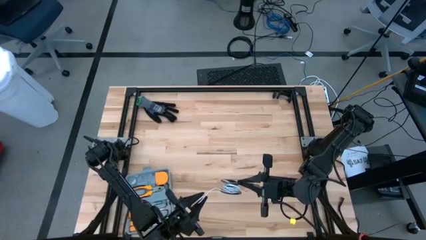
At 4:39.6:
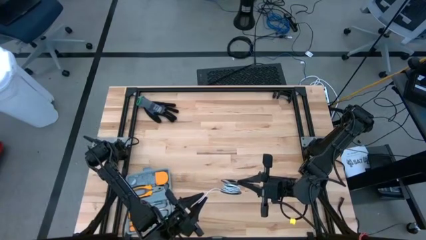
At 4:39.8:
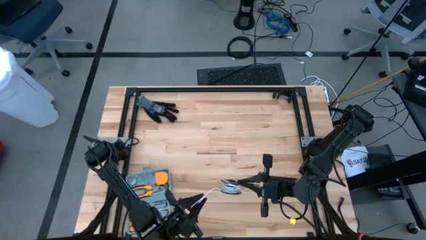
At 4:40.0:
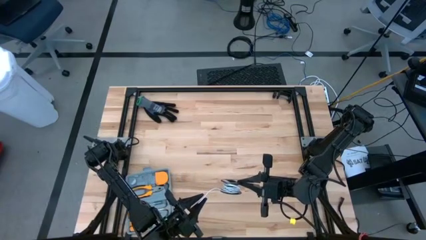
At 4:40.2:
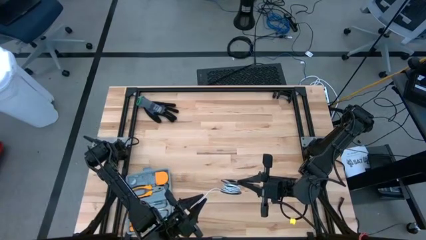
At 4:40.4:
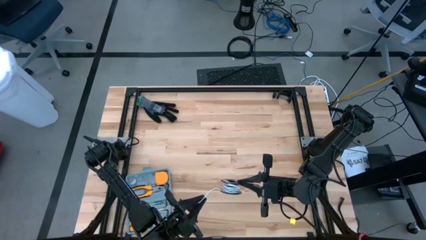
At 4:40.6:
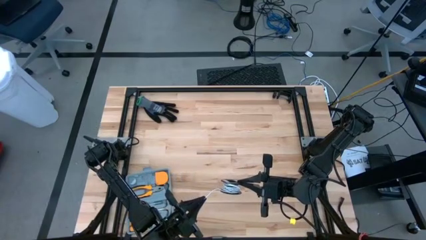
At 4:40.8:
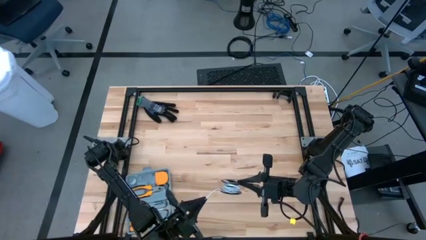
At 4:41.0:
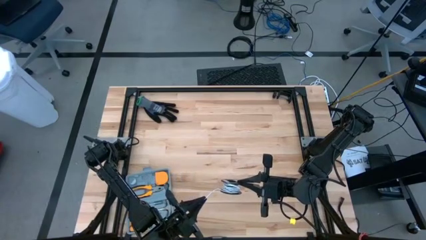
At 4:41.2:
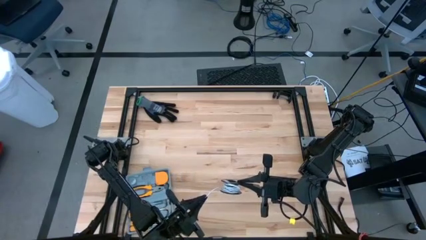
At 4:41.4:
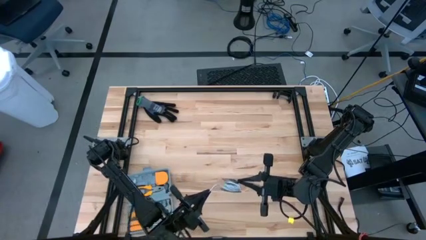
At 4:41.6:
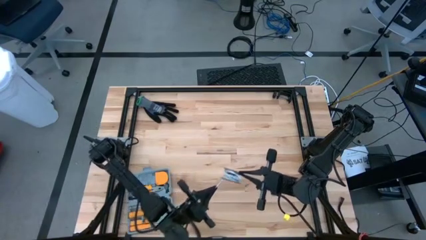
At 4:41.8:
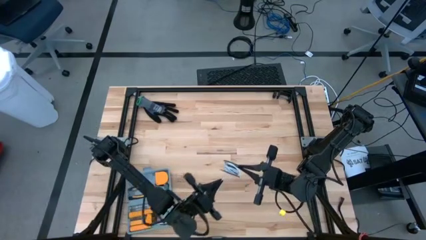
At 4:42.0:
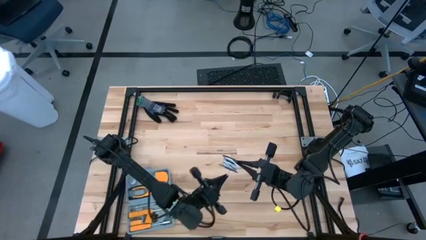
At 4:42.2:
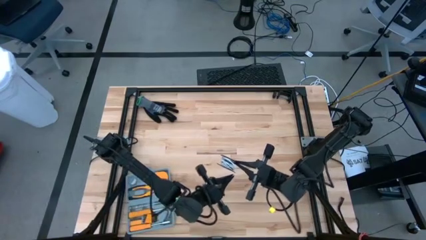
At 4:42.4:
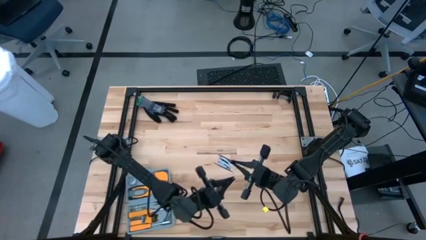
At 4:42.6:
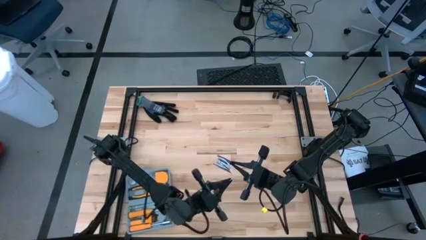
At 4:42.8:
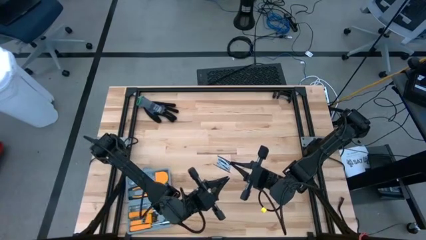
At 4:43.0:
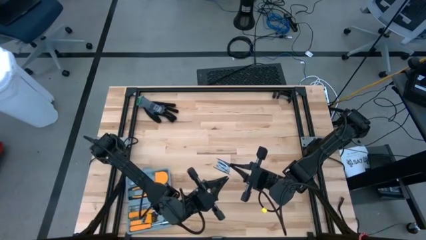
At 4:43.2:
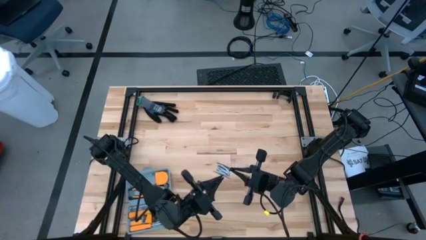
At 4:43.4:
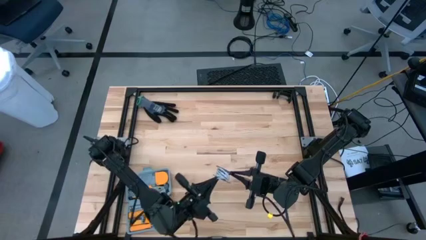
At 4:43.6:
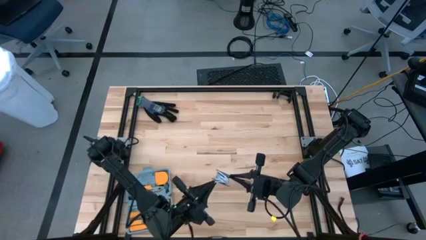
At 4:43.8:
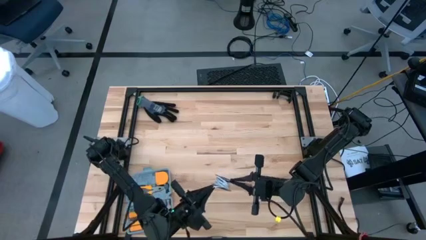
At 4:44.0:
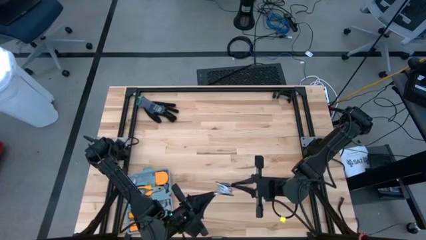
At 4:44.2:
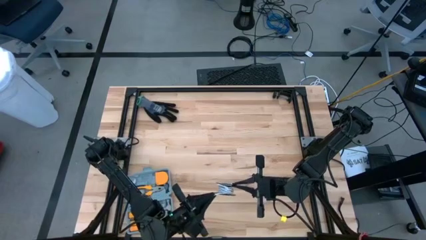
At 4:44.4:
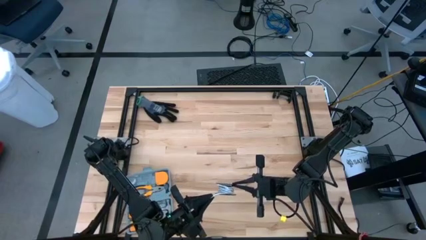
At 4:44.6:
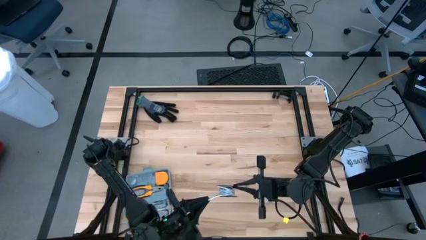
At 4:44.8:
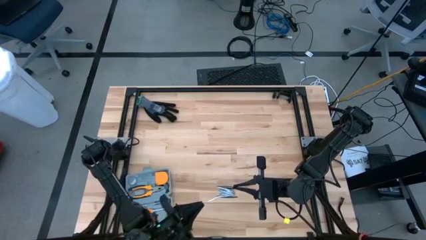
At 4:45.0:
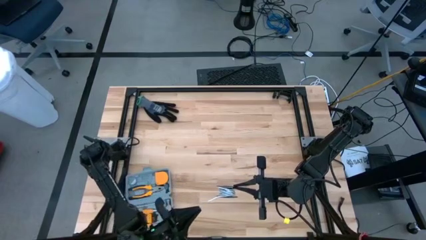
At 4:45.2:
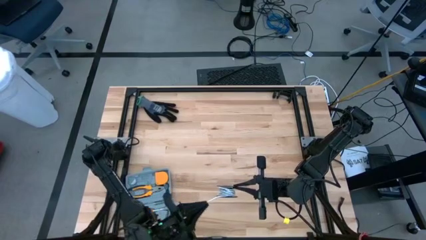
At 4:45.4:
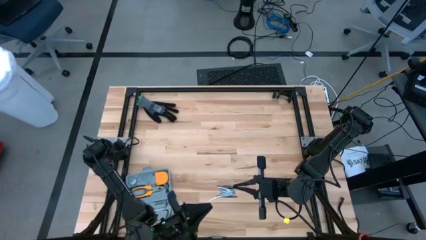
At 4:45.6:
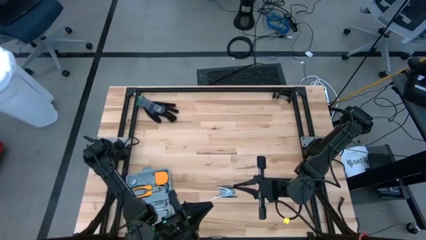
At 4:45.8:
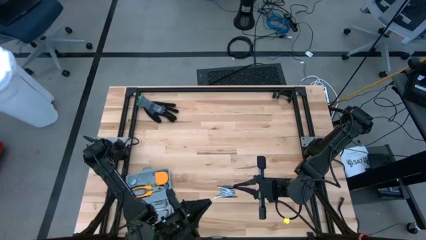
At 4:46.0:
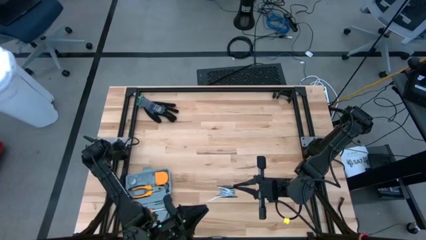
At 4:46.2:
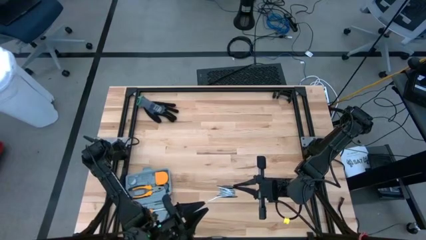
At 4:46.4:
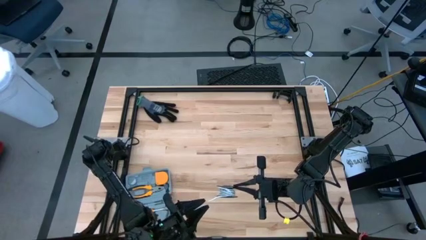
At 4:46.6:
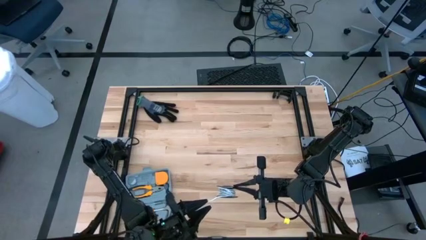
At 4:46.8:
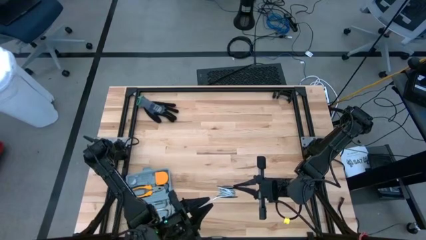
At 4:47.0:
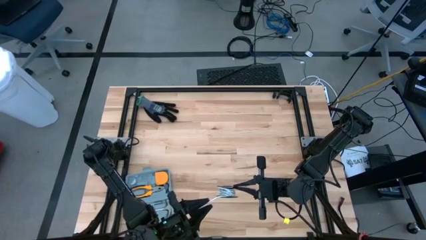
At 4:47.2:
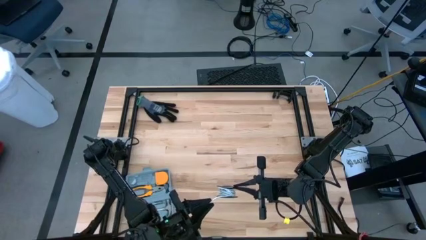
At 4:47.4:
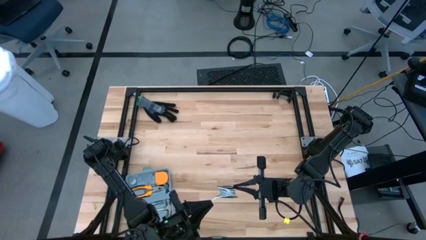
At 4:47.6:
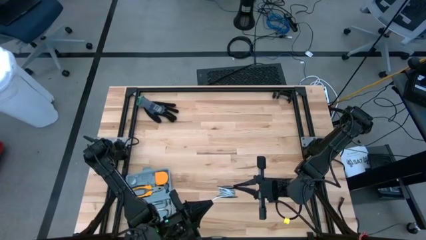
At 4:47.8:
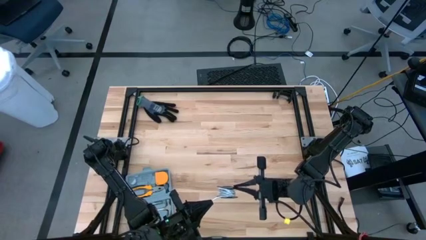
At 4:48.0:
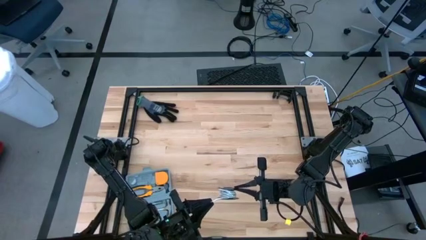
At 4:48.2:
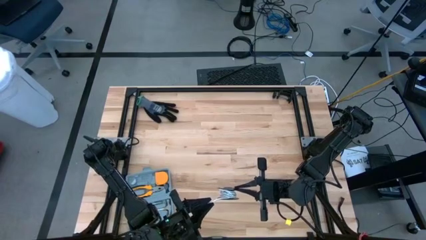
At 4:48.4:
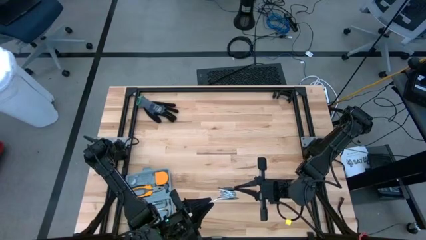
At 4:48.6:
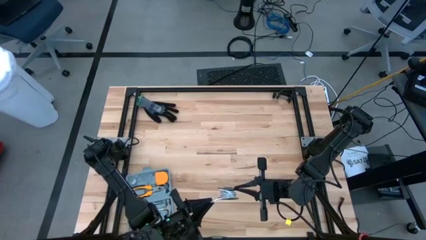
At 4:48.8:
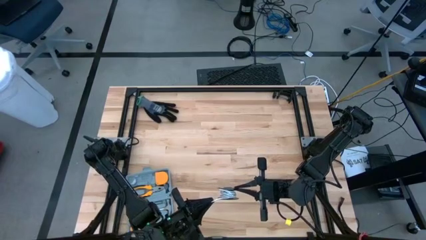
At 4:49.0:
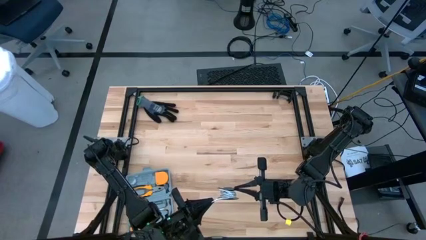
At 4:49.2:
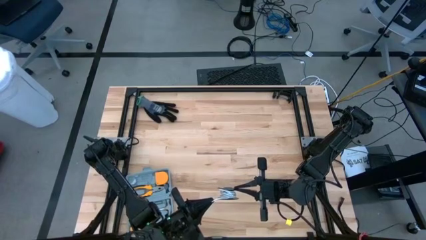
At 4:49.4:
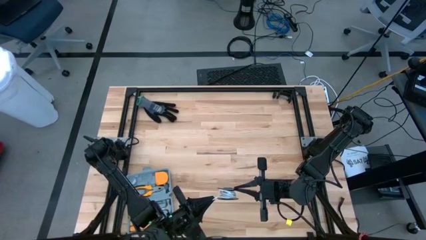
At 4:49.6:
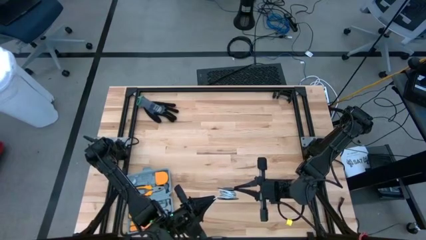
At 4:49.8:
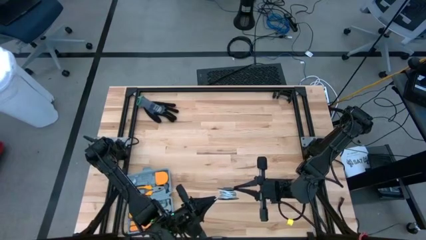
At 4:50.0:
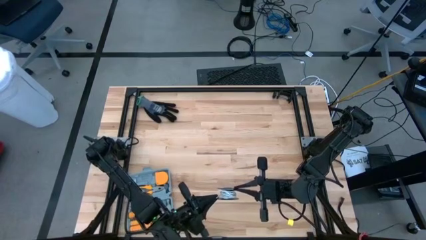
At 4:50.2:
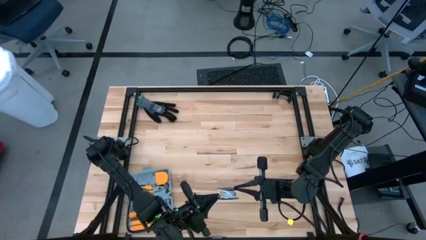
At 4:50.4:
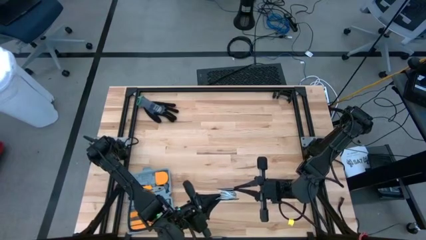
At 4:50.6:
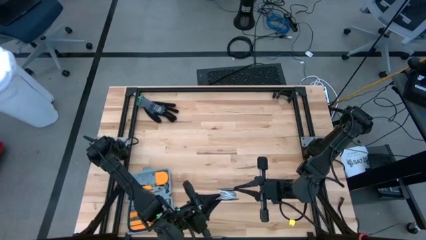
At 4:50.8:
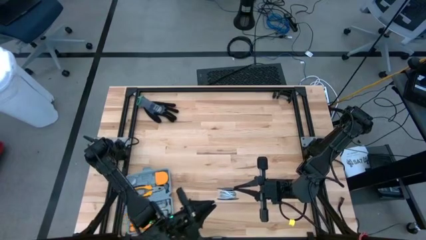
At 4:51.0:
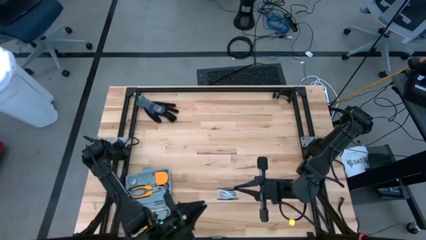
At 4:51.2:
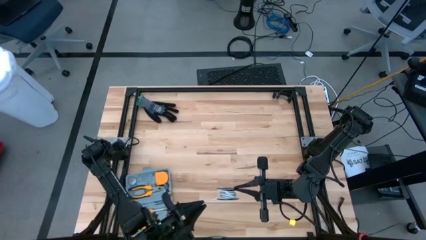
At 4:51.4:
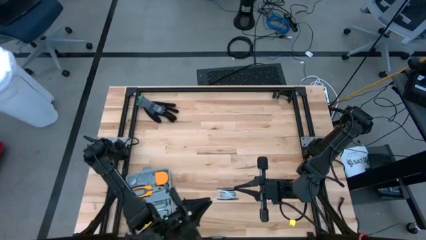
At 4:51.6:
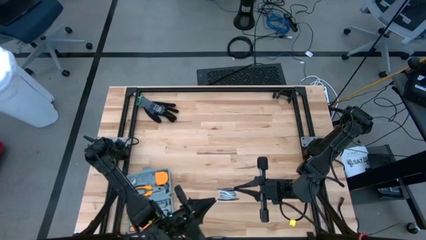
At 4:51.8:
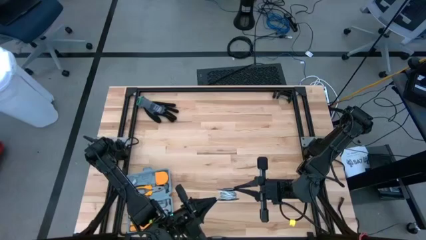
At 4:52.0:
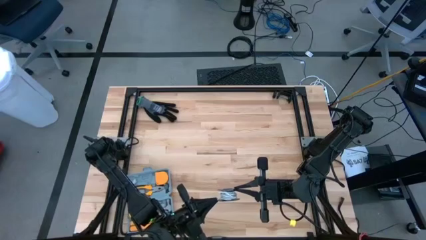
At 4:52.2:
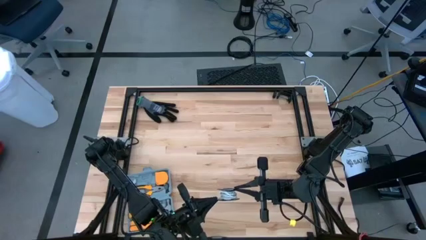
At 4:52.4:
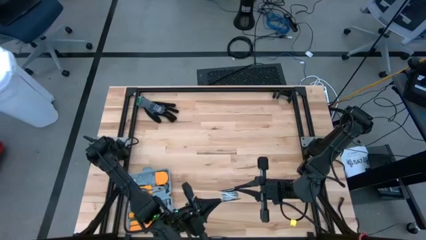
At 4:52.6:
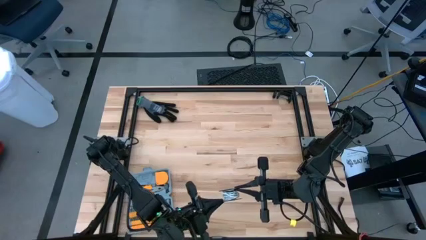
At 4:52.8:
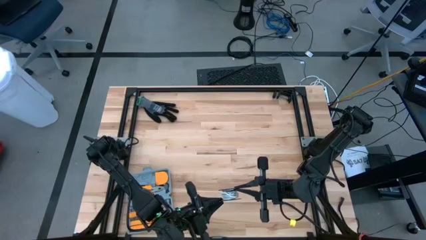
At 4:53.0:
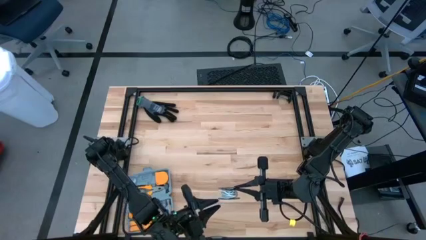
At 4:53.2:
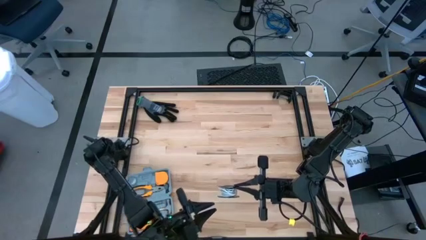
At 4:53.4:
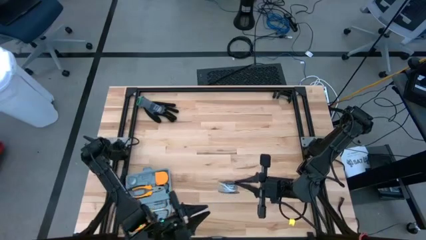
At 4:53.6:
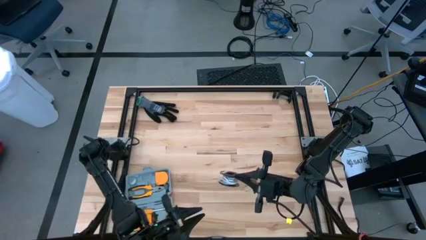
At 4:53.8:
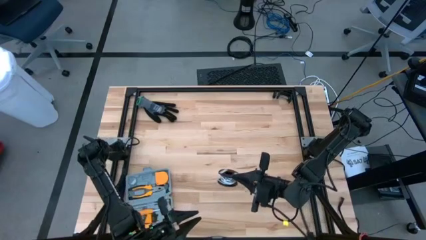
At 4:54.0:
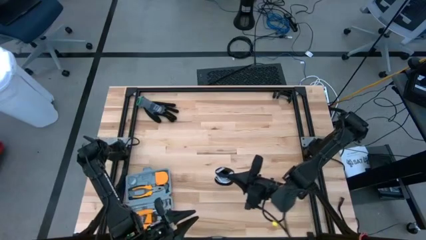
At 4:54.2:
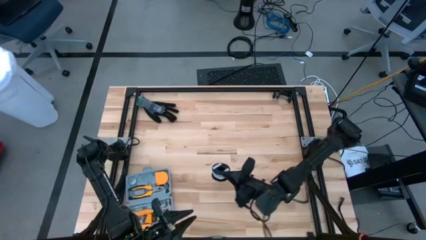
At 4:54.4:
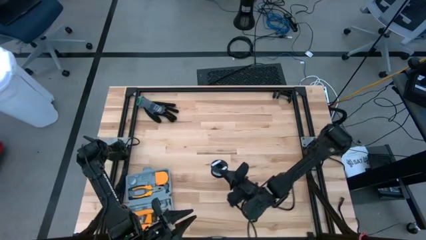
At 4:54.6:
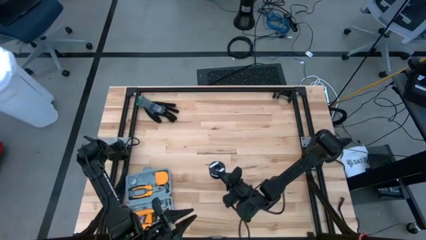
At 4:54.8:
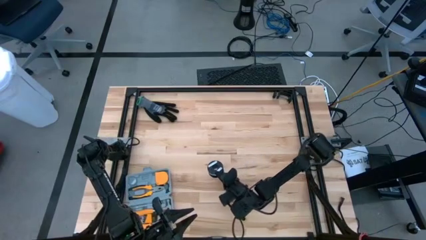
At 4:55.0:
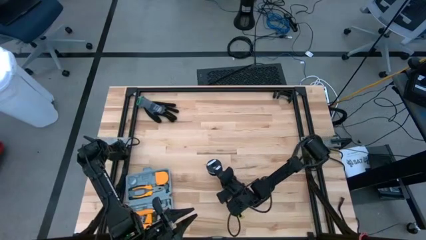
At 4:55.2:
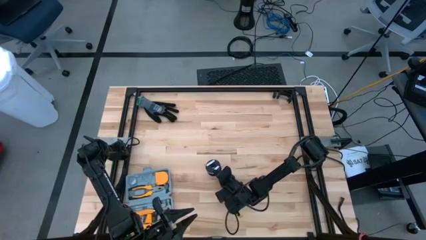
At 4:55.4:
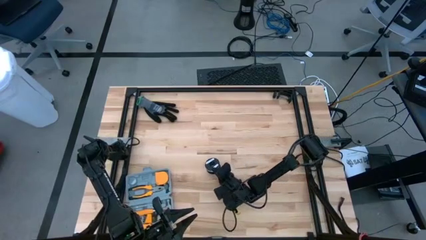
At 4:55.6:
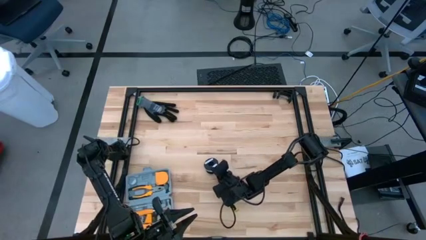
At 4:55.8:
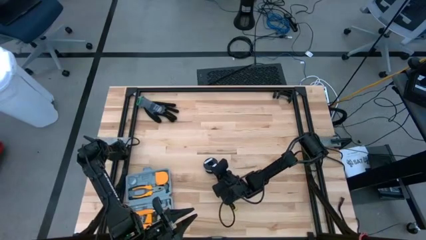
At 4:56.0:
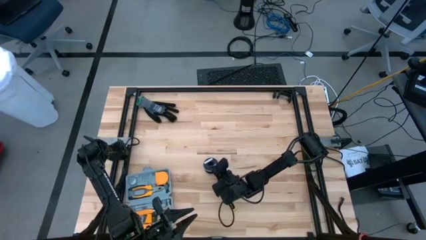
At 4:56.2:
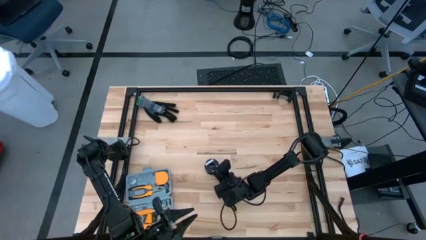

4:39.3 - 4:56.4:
Task: Coil cords
Coil the white cable wire into the spool
